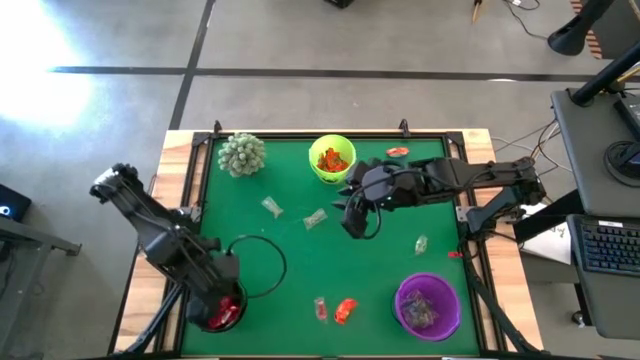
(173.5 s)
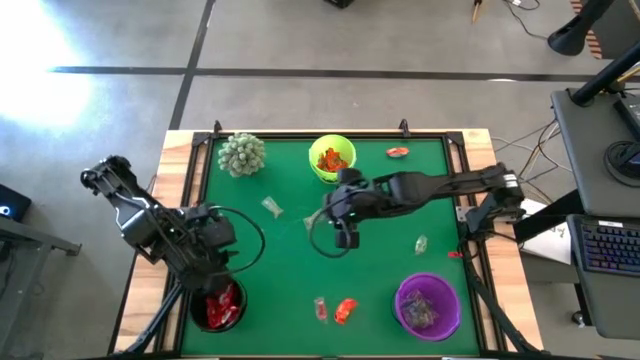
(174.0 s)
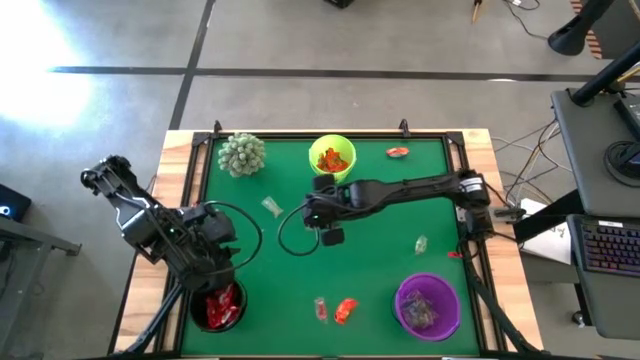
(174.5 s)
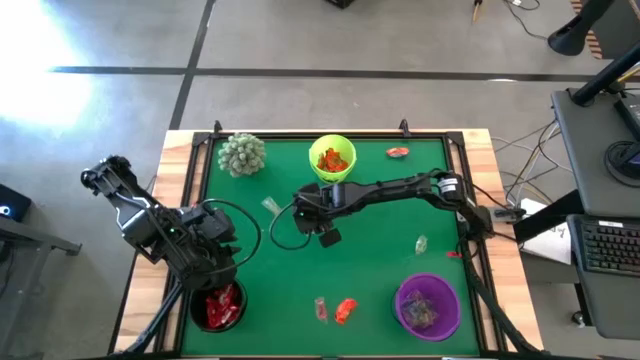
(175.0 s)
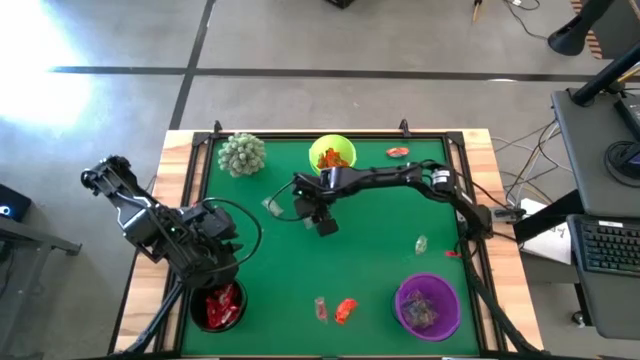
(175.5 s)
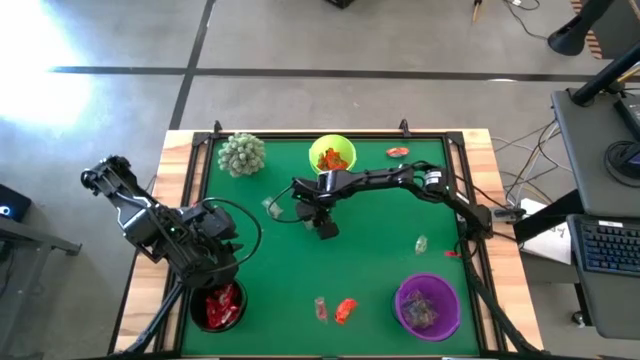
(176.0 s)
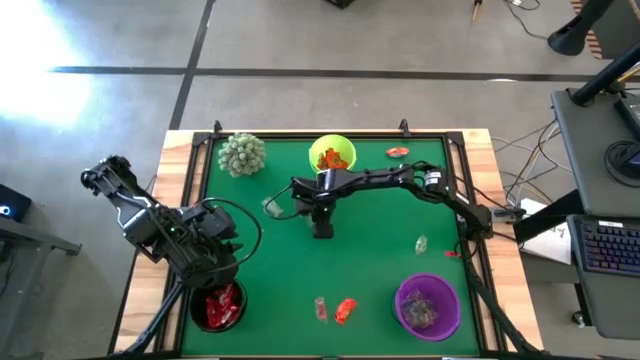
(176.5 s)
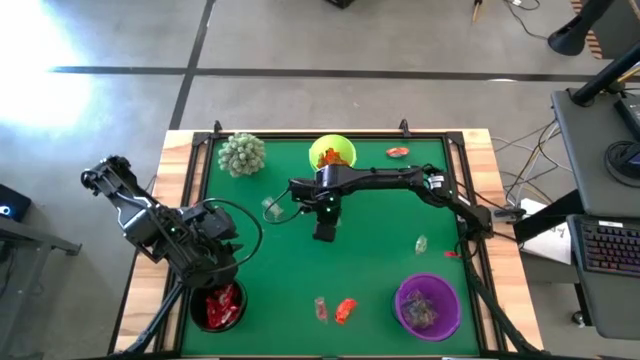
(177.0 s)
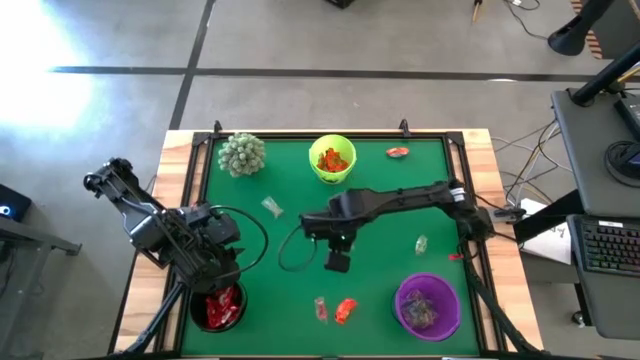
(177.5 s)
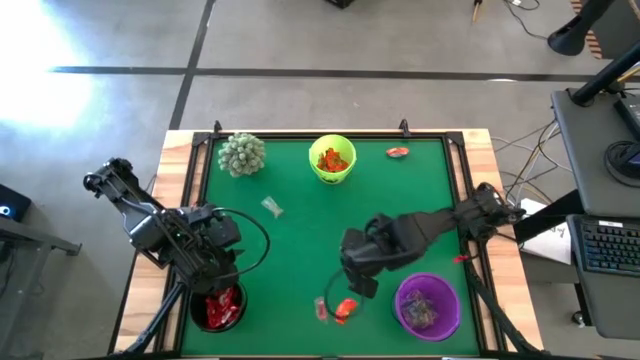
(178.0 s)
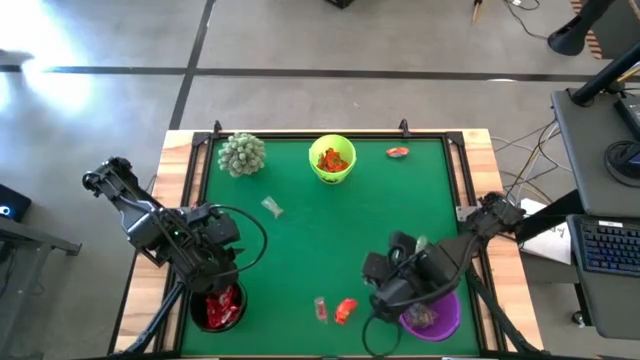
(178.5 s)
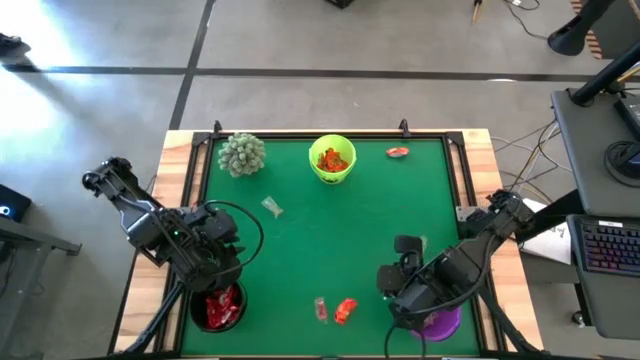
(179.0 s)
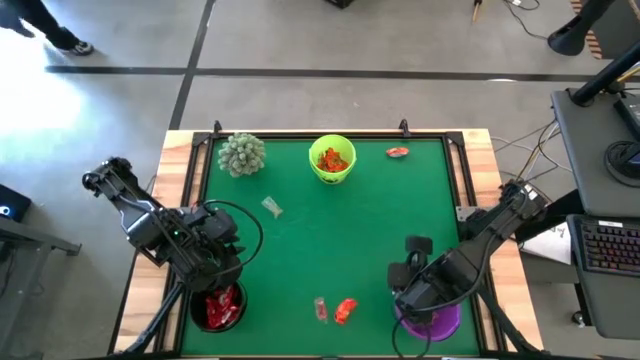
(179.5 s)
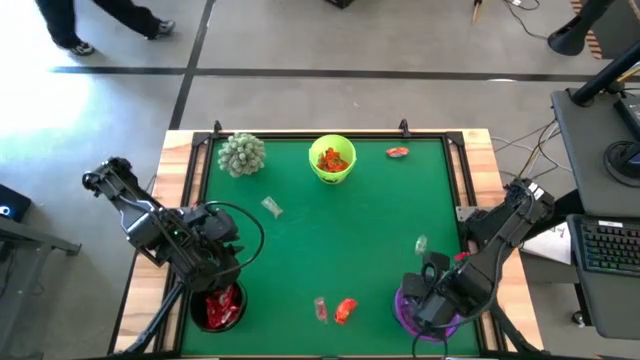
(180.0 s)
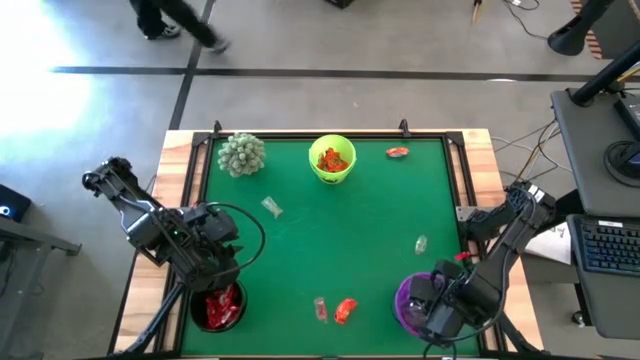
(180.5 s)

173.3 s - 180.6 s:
Task: Organize candy in baskets
Put the green candy into the violet bucket

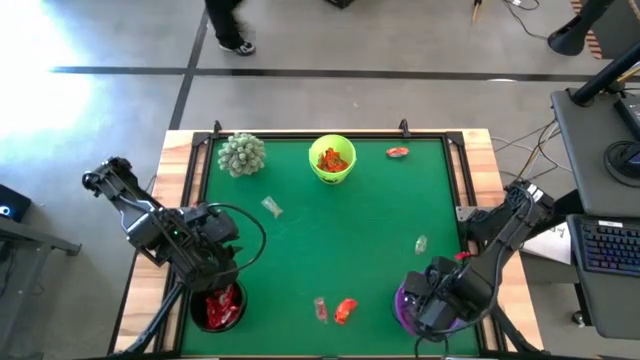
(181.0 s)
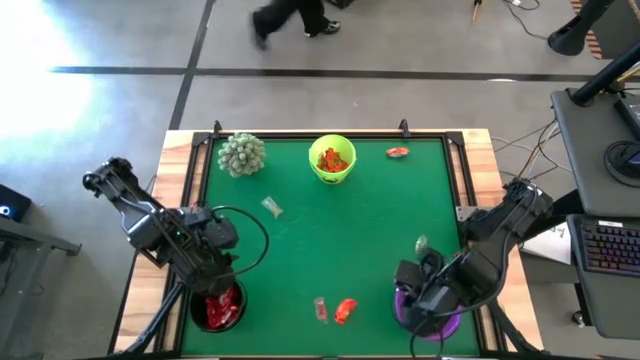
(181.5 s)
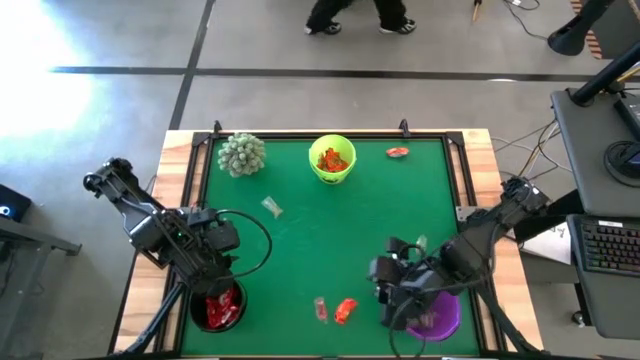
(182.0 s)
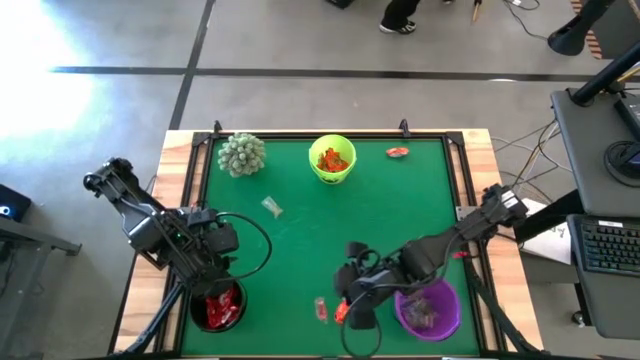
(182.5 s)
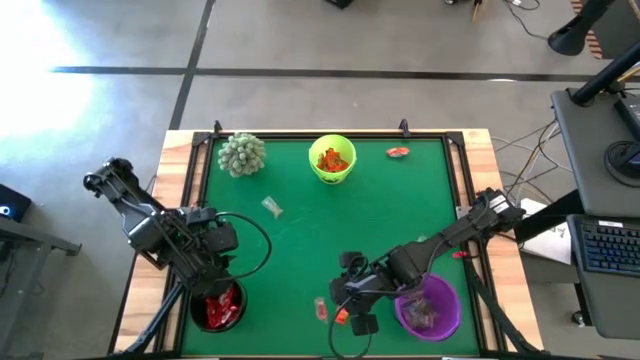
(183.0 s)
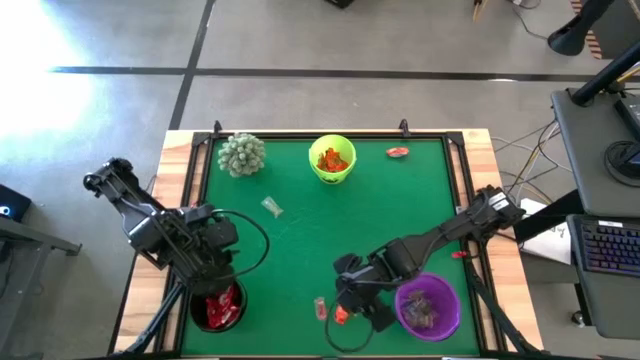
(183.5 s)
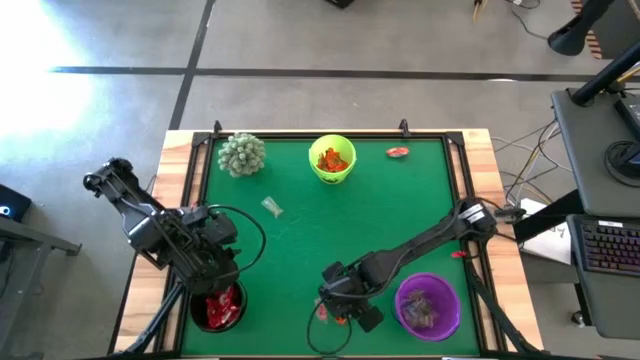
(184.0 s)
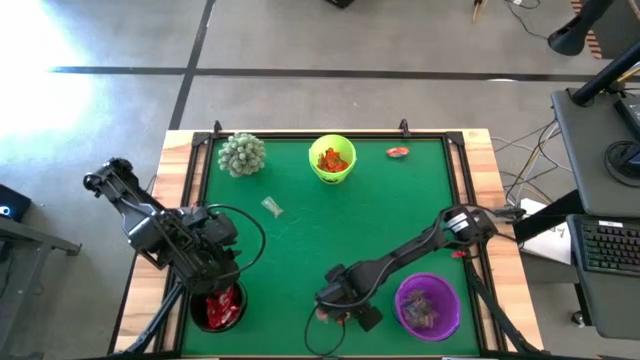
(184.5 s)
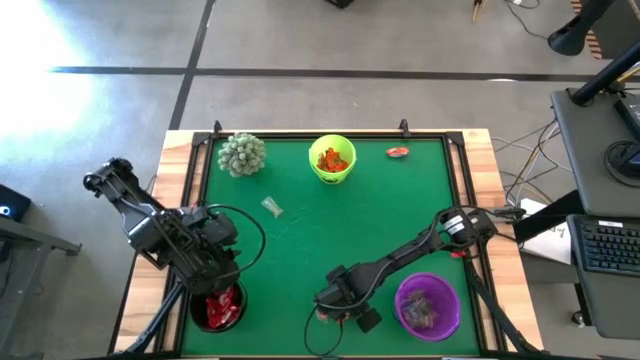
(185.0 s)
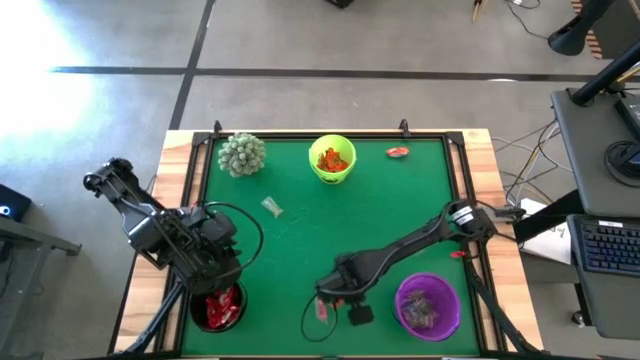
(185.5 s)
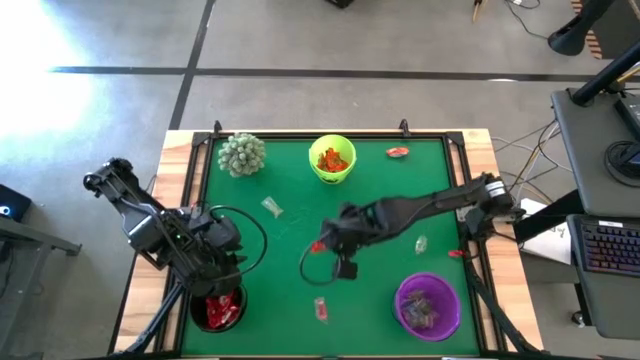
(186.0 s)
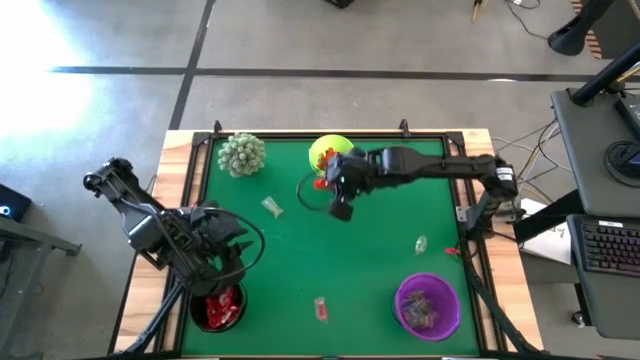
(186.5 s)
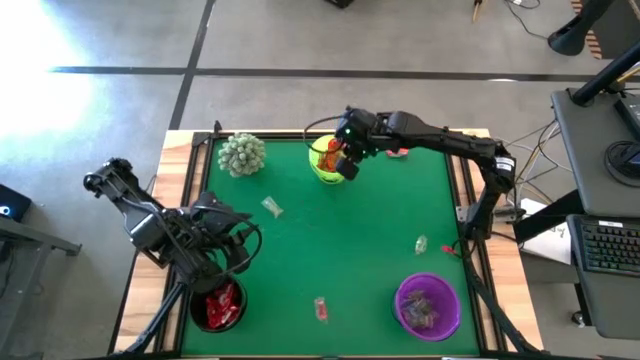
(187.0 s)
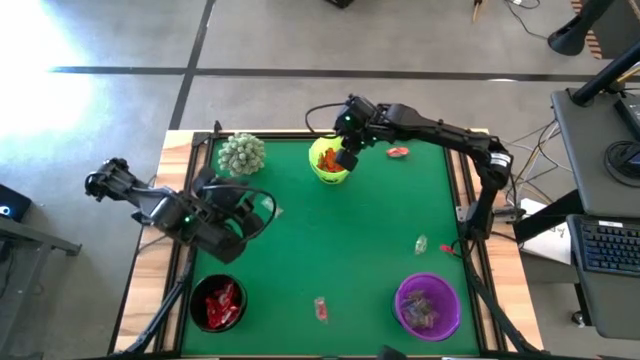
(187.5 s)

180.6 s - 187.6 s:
Put the orange candy into the green bucket

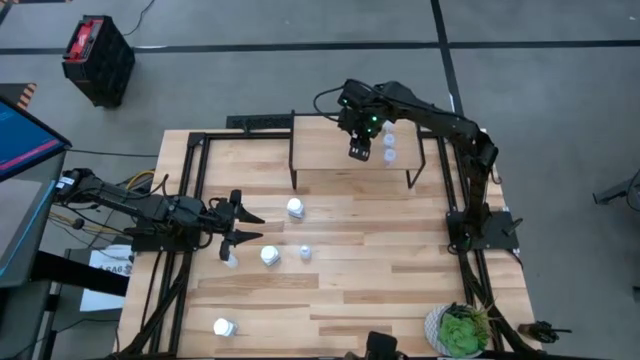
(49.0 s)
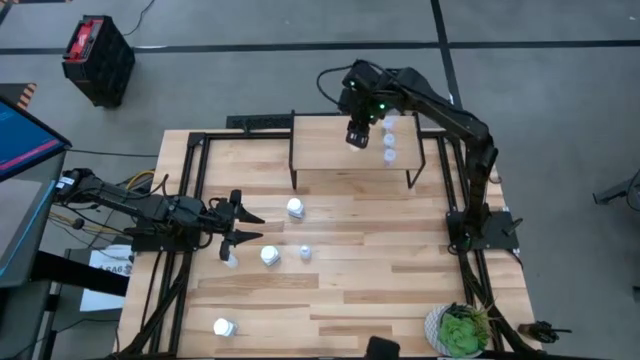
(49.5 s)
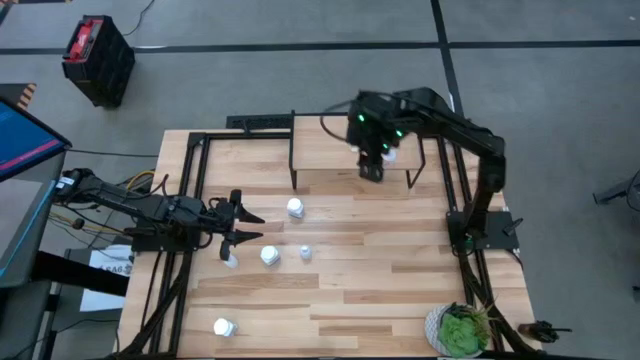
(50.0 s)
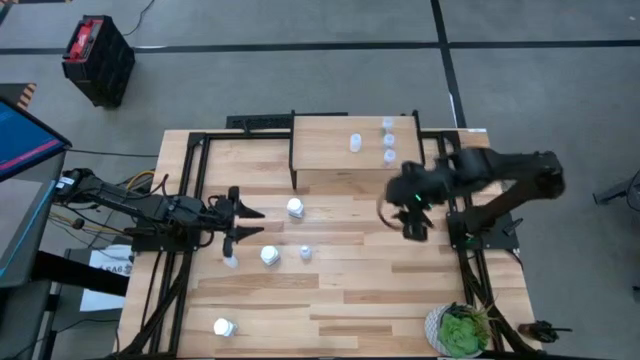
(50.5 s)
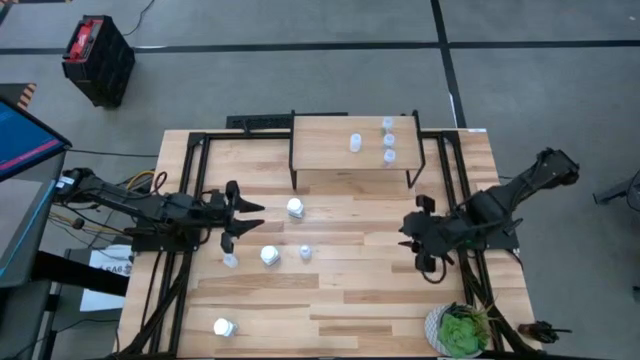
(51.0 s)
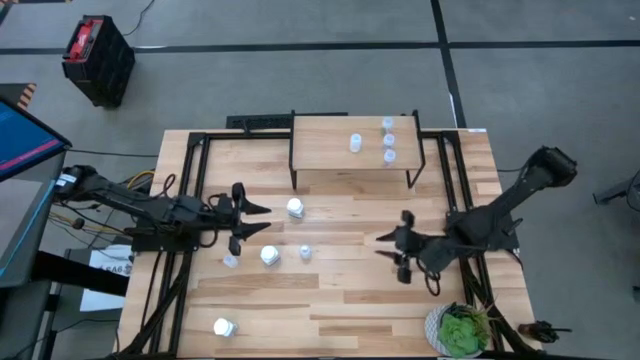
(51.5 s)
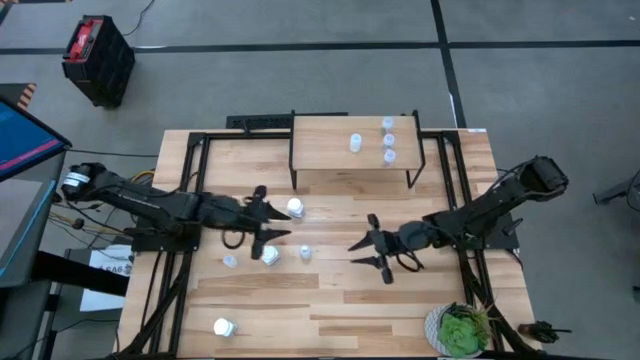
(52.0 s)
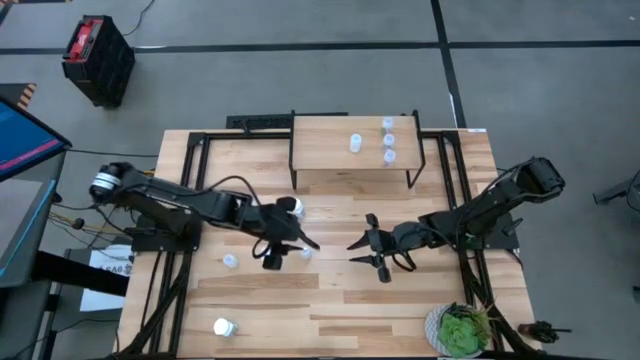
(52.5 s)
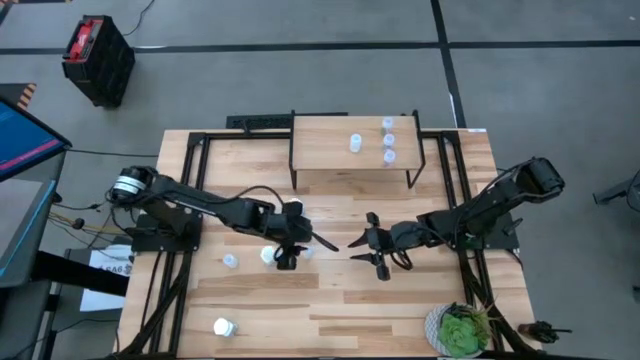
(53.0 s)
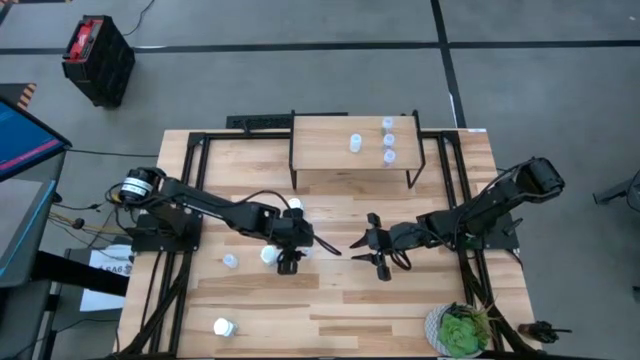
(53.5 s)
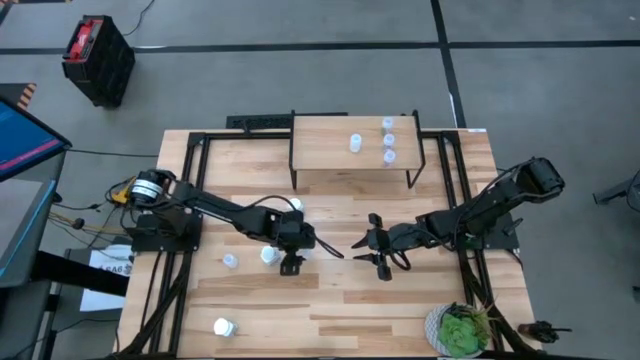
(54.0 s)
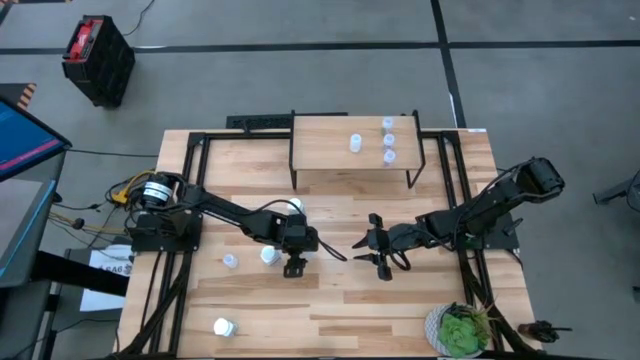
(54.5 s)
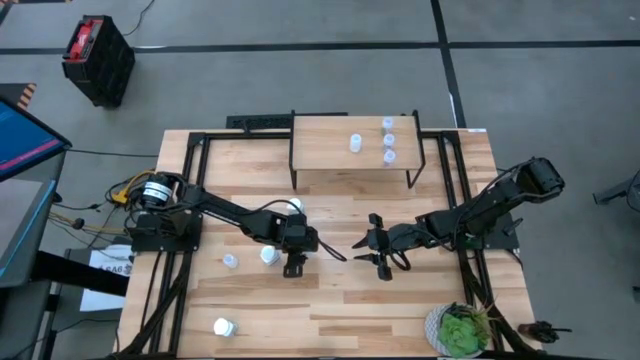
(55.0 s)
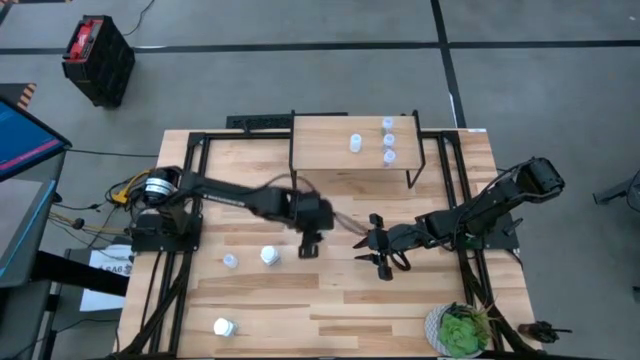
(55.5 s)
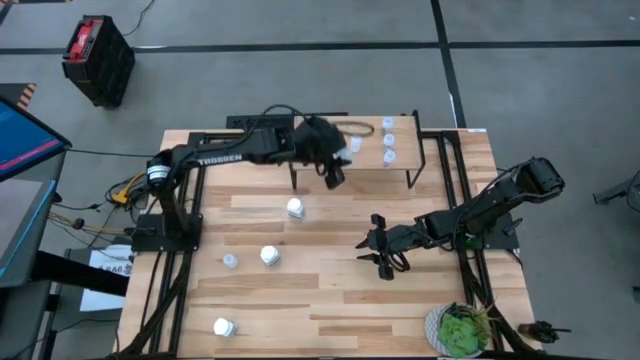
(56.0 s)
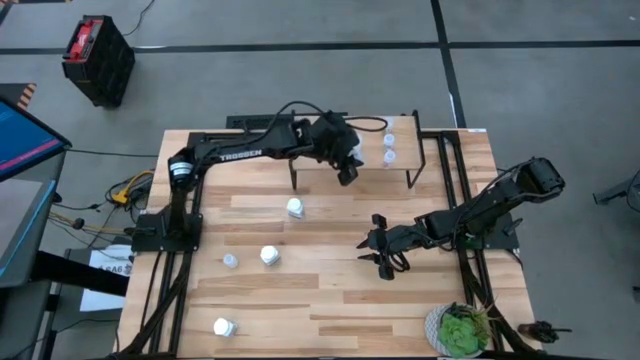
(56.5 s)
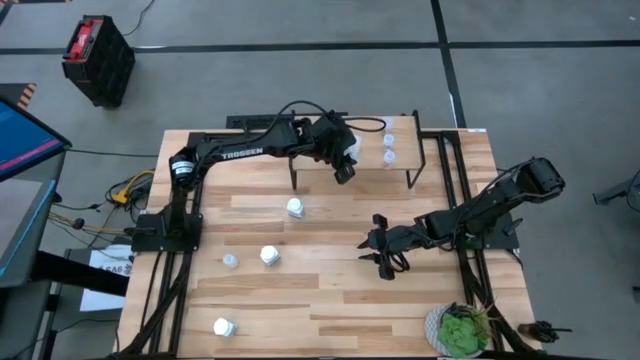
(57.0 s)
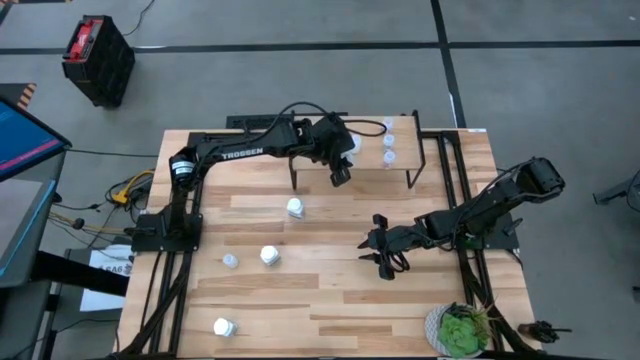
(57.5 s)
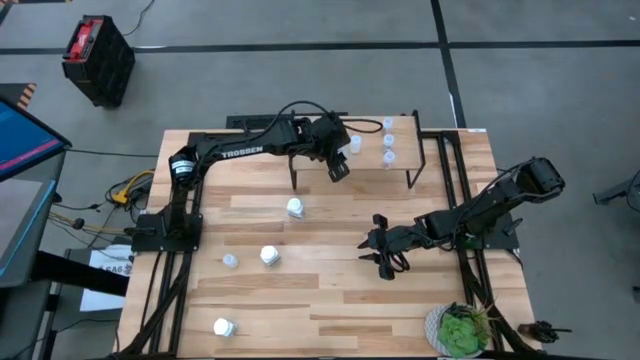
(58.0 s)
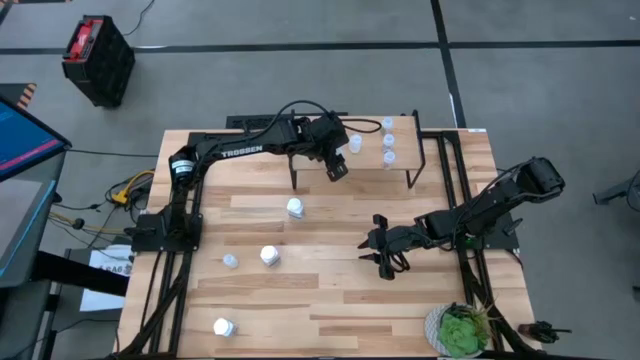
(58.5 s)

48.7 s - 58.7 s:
Task: Pick and place medicine bottles onto shelf by color
Put the bottom translucent medicine bottle onto the middle of the shelf
